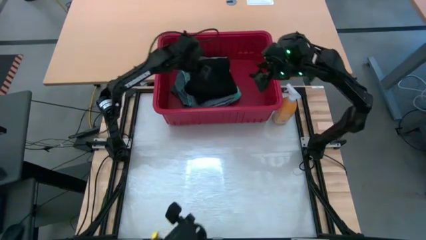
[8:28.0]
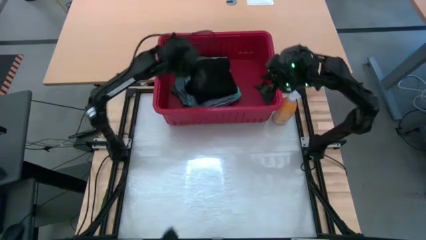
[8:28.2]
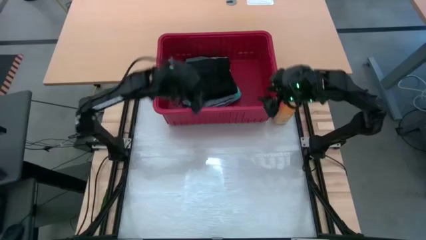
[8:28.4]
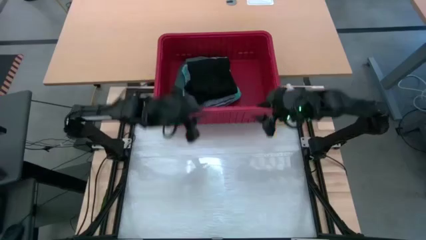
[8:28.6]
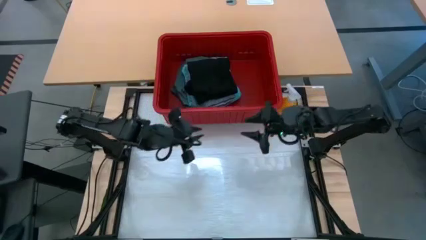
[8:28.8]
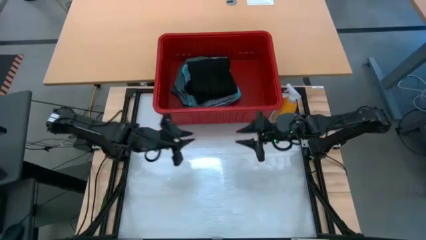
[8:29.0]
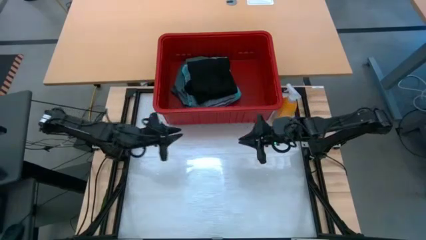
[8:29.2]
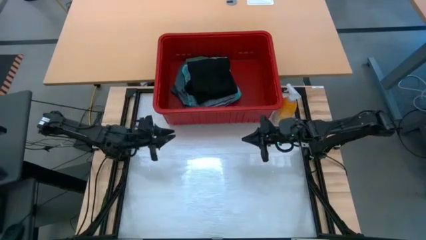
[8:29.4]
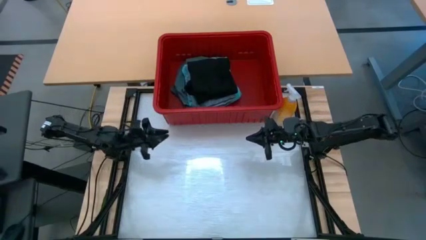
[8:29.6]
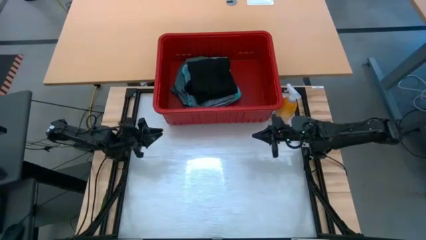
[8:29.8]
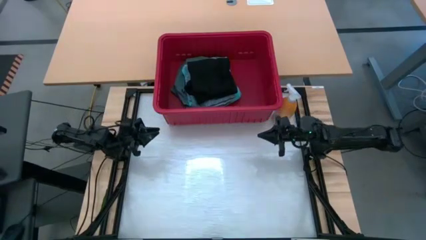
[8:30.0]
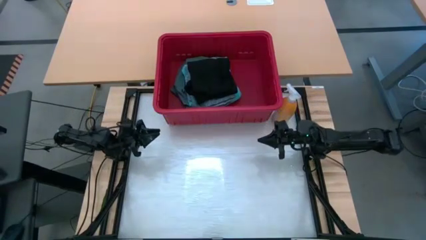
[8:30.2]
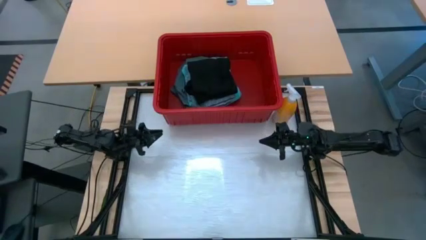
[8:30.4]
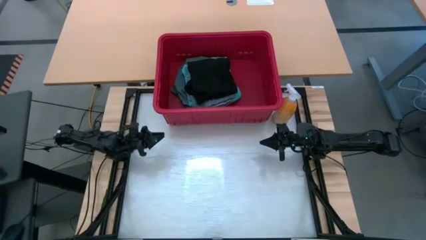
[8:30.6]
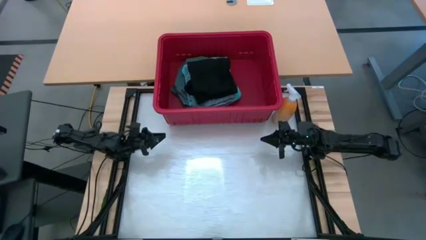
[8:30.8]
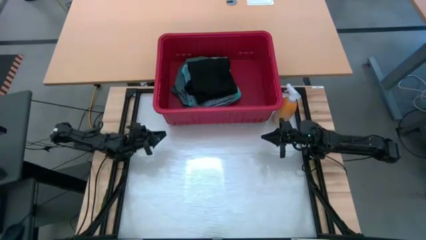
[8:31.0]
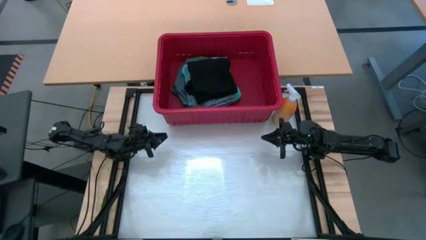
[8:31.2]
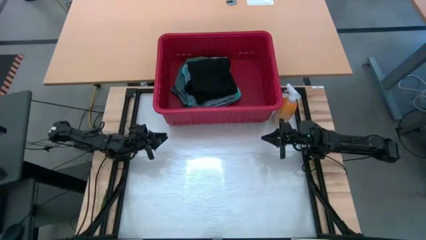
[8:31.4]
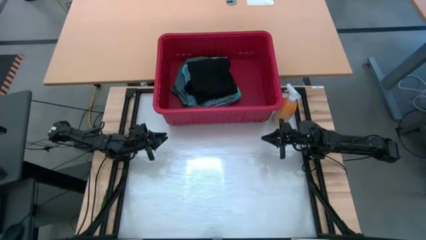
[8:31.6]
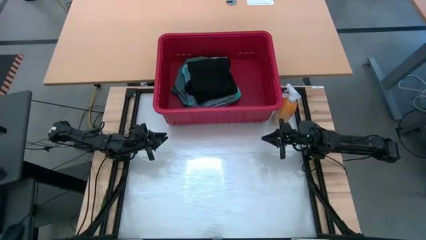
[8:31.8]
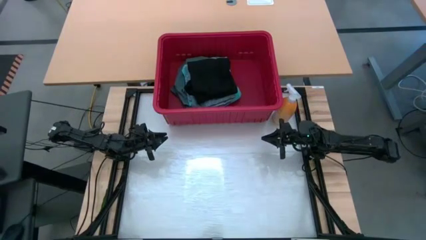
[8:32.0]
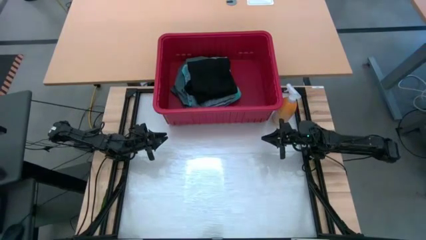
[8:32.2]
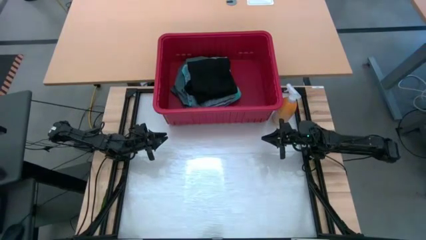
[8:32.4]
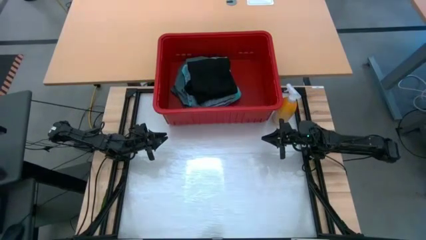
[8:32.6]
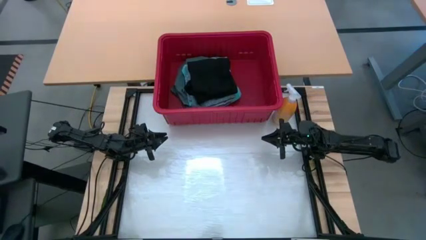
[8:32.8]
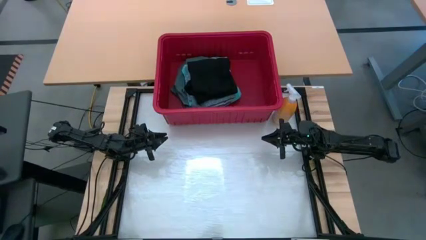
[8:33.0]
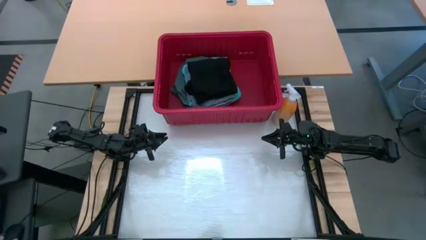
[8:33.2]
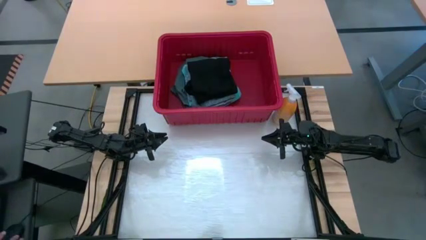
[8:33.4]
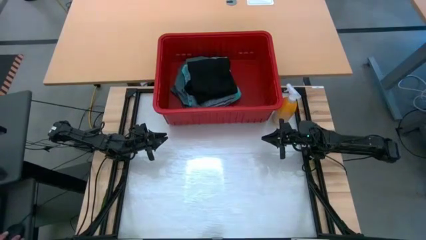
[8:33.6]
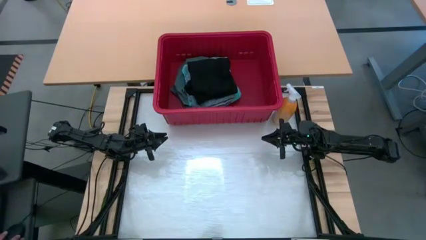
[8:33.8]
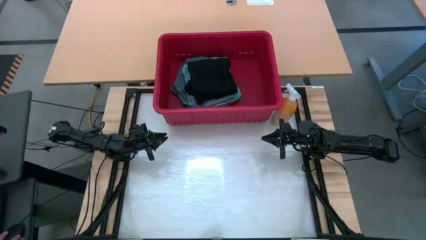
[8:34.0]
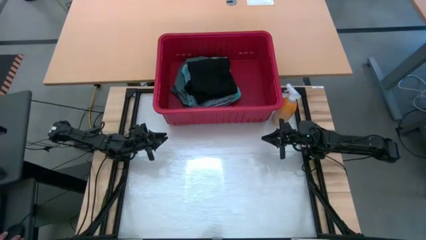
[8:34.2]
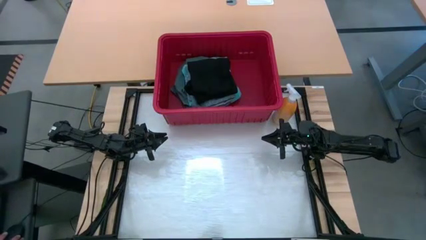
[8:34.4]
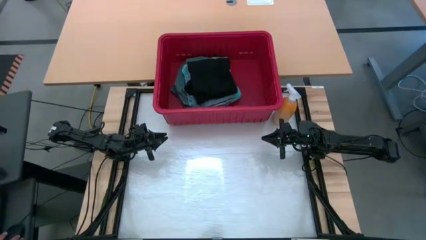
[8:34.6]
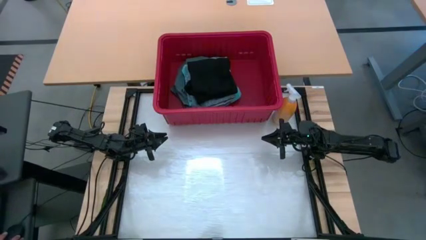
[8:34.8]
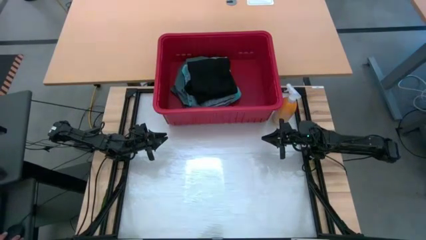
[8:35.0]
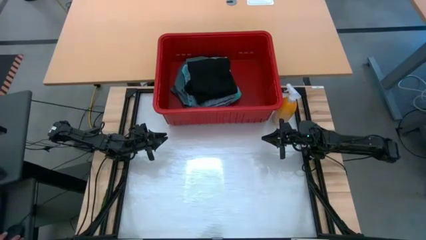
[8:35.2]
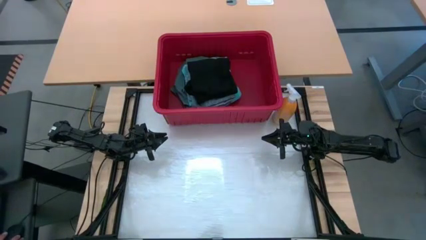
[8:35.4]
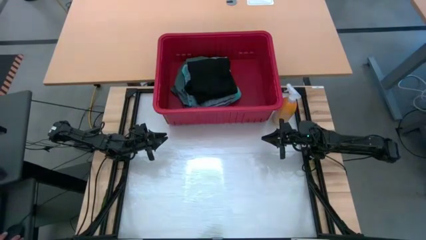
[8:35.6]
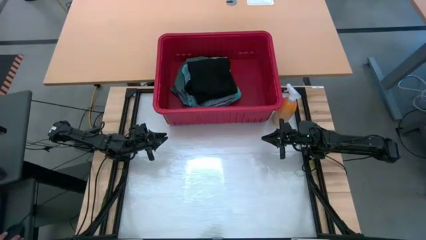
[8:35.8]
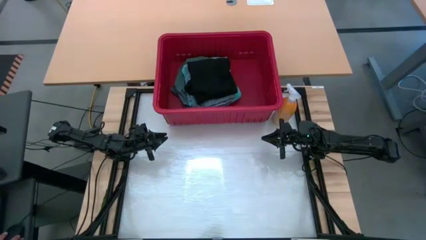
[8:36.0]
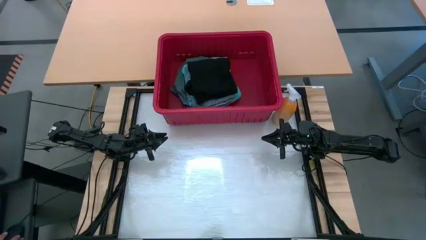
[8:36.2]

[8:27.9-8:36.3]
Task: Fold Laundry from Bin
Return to Home Position
